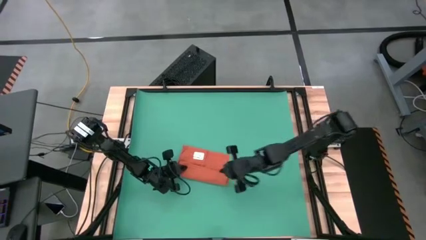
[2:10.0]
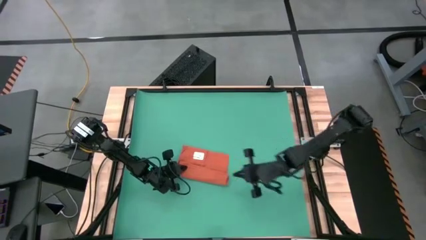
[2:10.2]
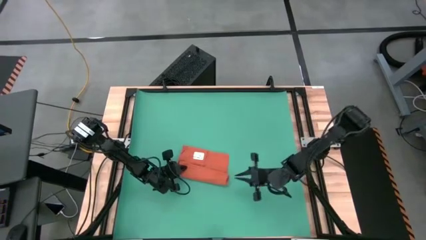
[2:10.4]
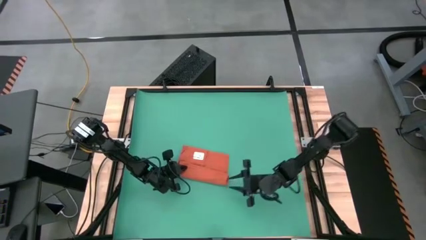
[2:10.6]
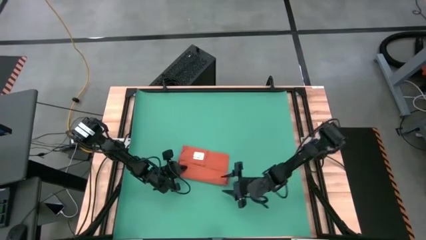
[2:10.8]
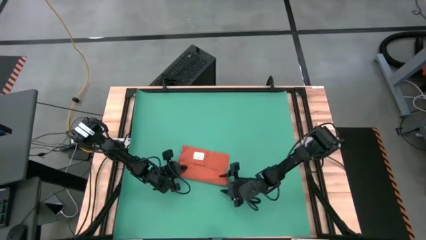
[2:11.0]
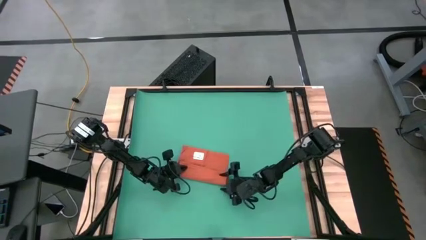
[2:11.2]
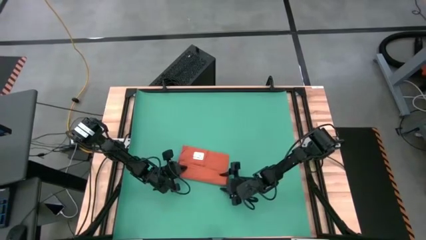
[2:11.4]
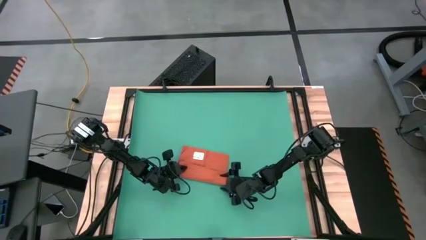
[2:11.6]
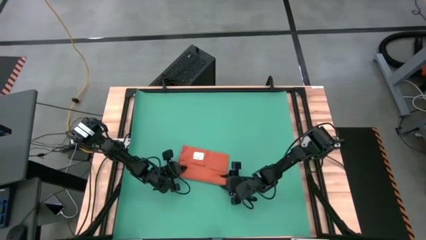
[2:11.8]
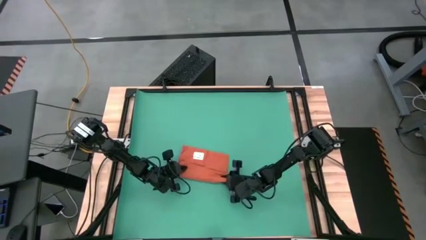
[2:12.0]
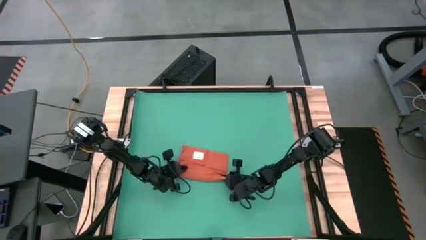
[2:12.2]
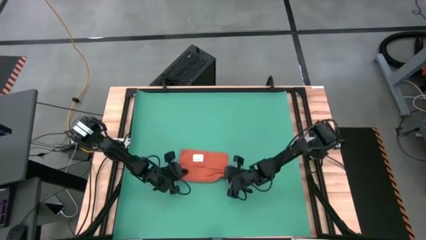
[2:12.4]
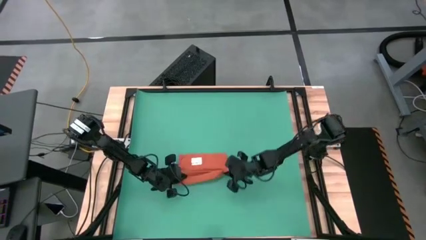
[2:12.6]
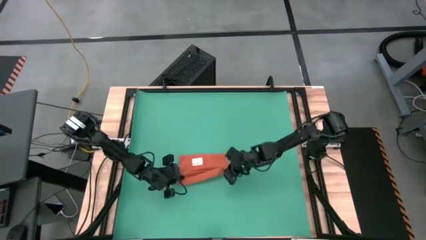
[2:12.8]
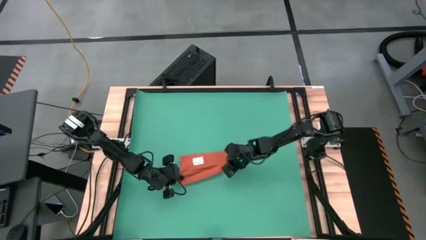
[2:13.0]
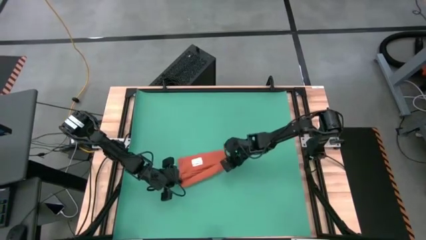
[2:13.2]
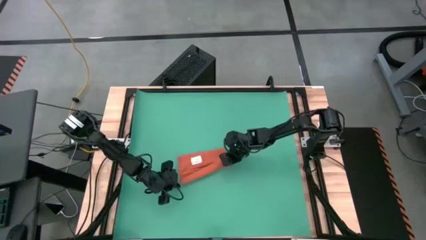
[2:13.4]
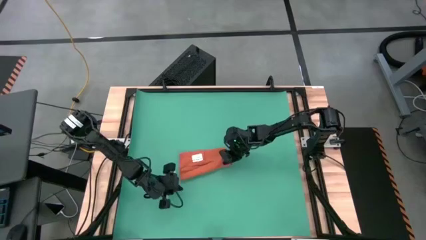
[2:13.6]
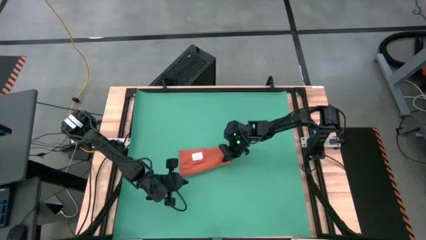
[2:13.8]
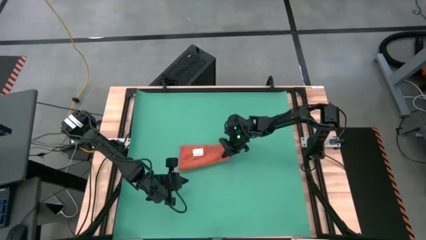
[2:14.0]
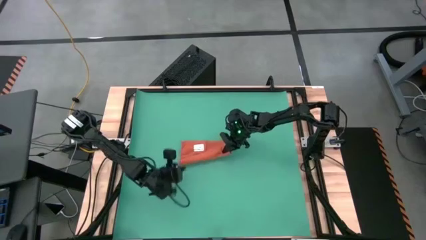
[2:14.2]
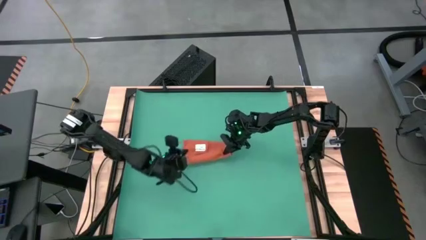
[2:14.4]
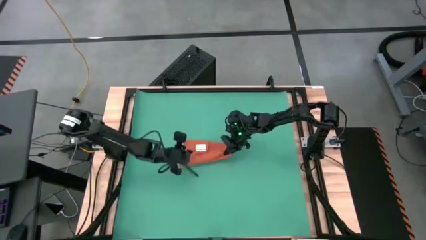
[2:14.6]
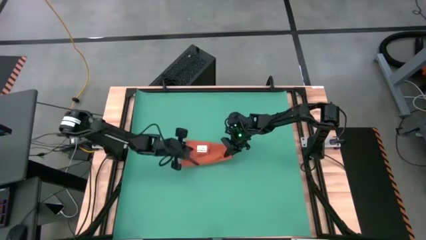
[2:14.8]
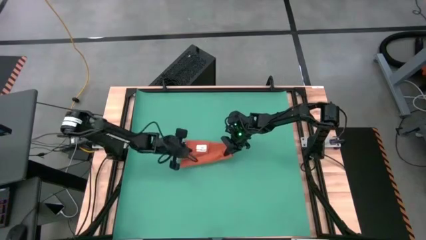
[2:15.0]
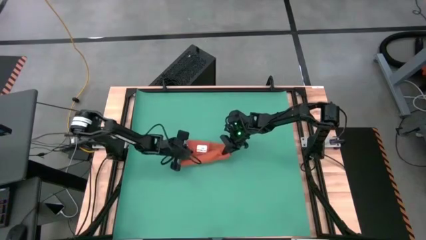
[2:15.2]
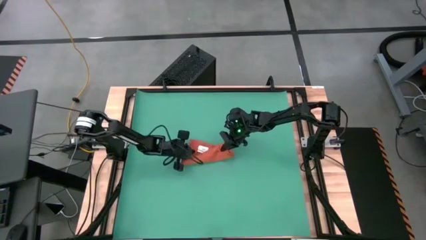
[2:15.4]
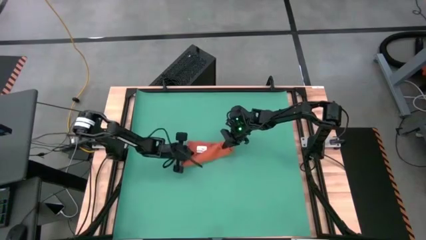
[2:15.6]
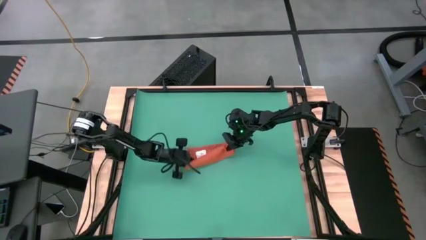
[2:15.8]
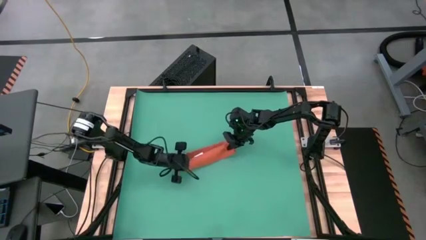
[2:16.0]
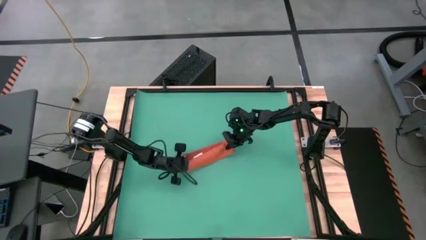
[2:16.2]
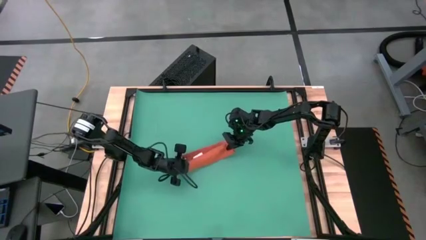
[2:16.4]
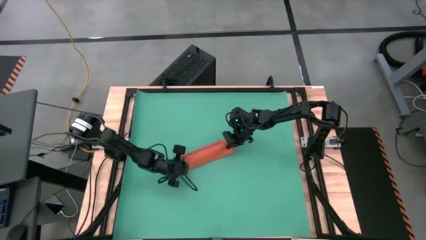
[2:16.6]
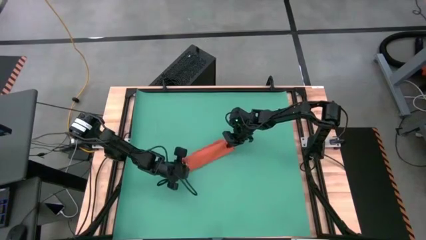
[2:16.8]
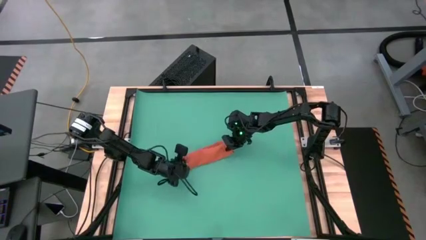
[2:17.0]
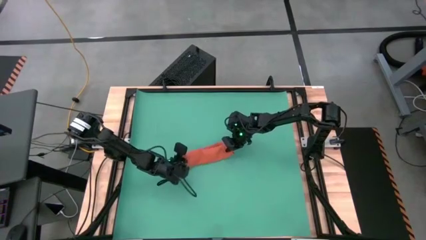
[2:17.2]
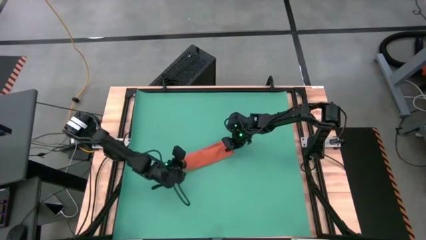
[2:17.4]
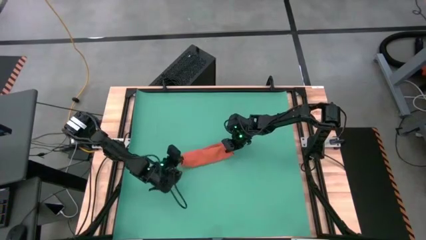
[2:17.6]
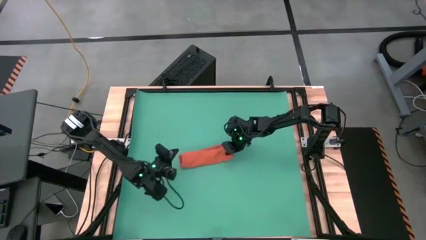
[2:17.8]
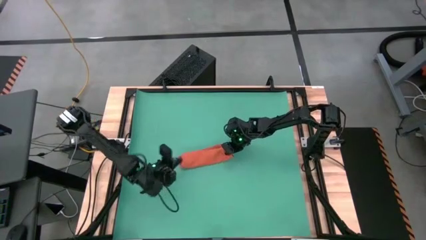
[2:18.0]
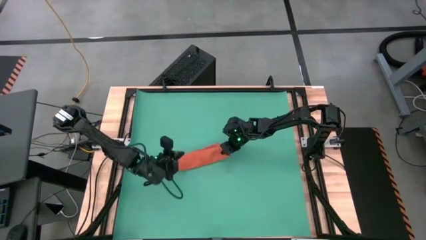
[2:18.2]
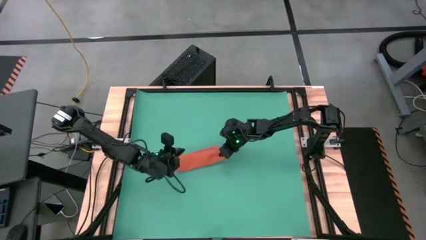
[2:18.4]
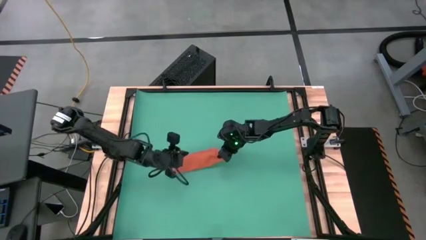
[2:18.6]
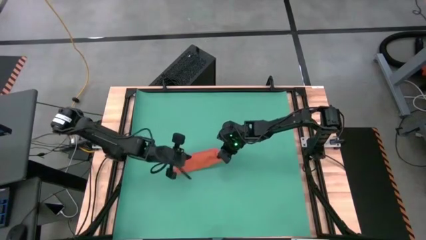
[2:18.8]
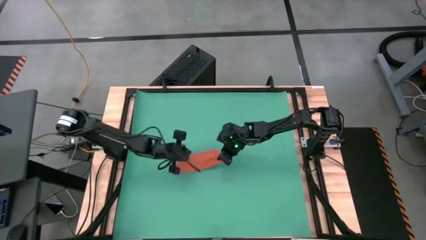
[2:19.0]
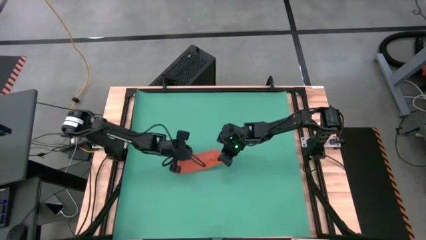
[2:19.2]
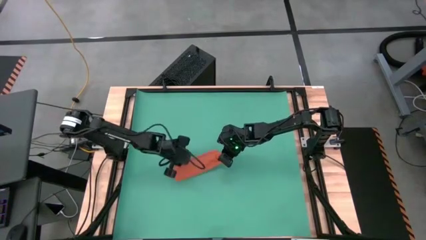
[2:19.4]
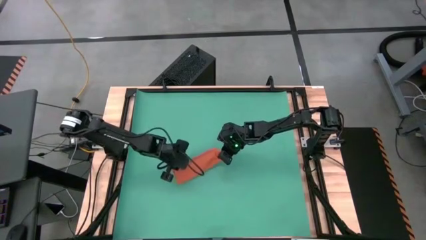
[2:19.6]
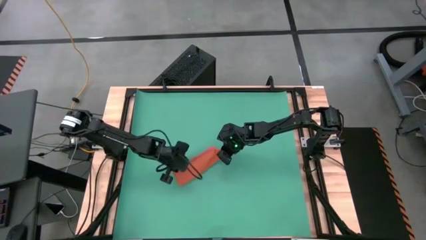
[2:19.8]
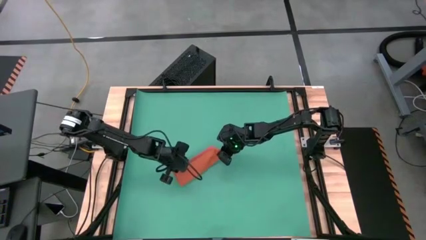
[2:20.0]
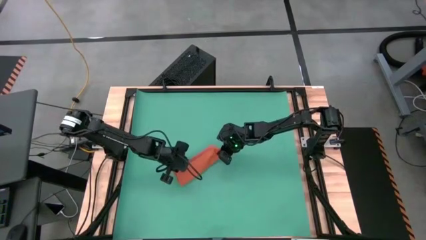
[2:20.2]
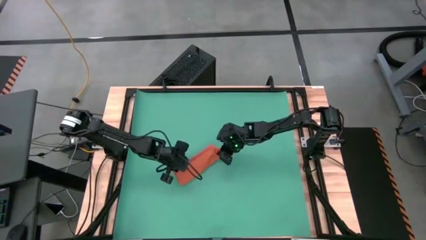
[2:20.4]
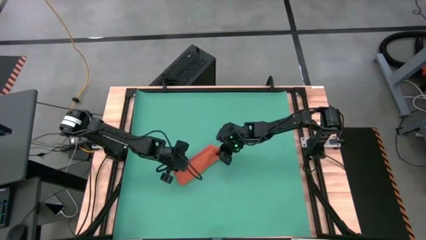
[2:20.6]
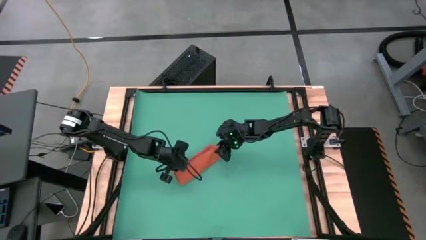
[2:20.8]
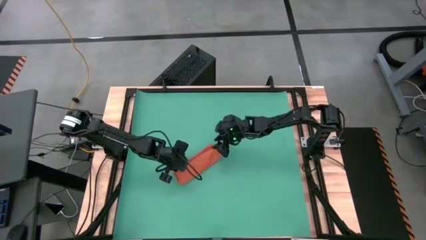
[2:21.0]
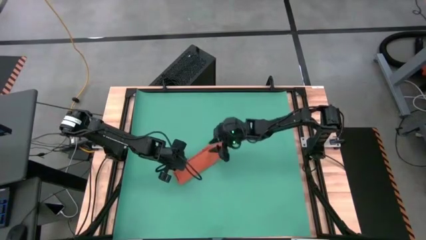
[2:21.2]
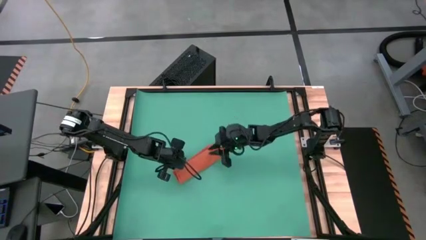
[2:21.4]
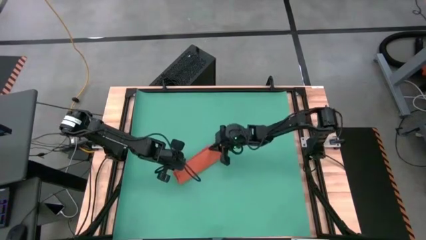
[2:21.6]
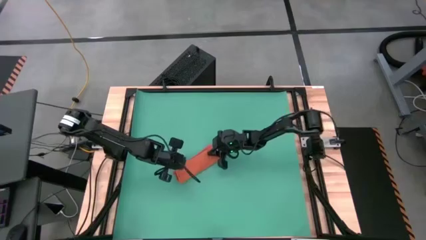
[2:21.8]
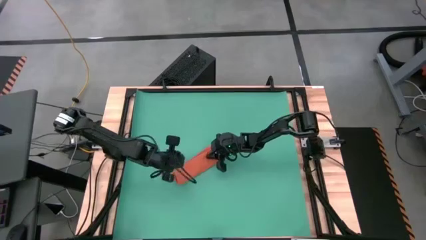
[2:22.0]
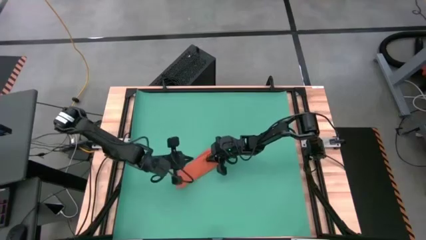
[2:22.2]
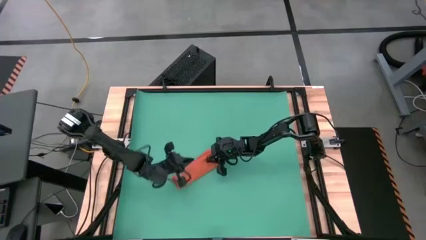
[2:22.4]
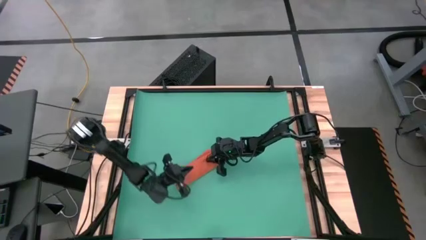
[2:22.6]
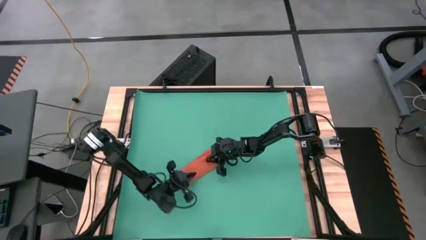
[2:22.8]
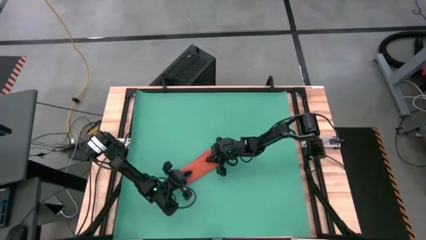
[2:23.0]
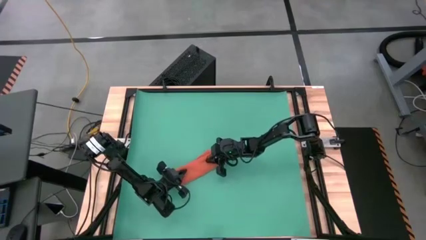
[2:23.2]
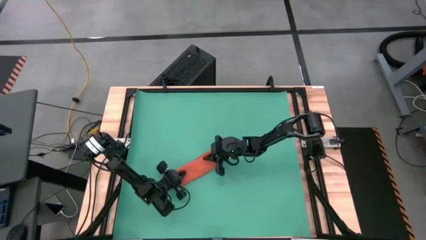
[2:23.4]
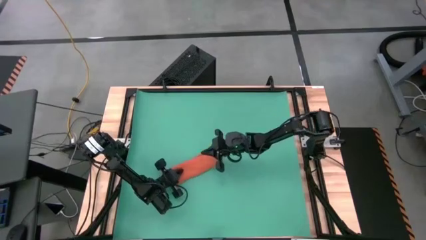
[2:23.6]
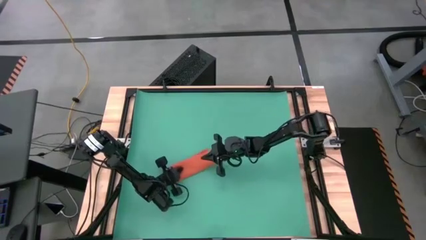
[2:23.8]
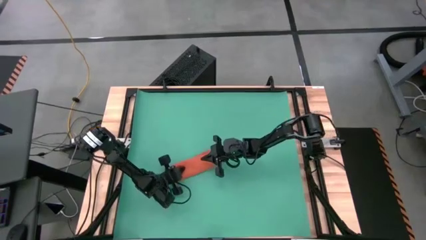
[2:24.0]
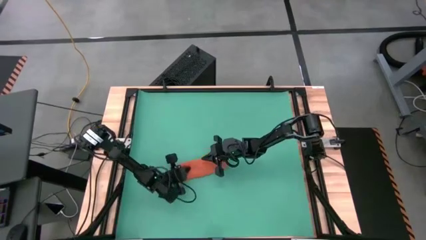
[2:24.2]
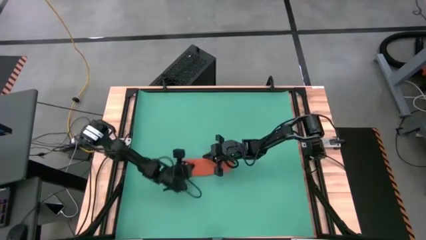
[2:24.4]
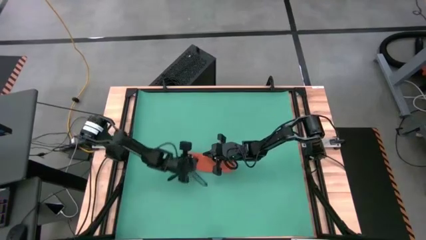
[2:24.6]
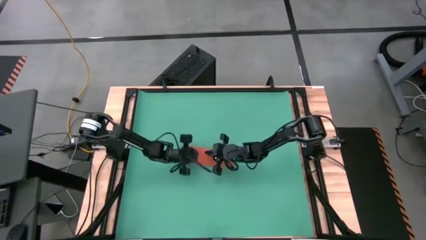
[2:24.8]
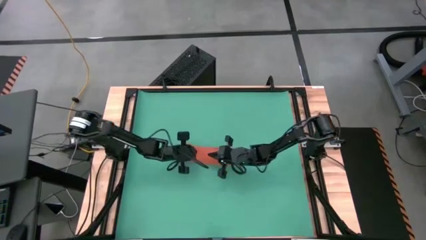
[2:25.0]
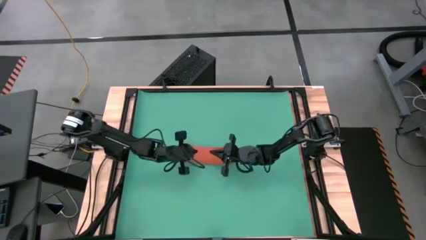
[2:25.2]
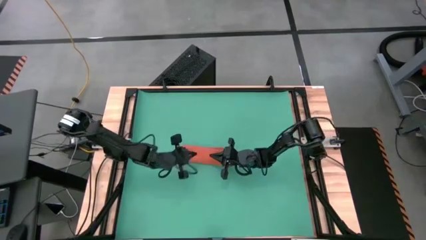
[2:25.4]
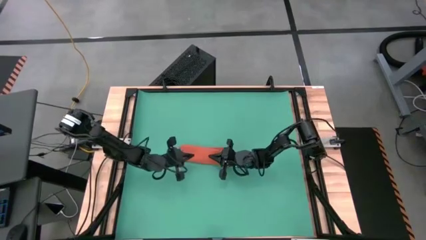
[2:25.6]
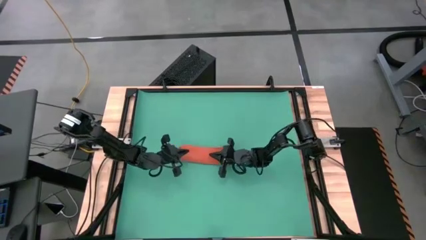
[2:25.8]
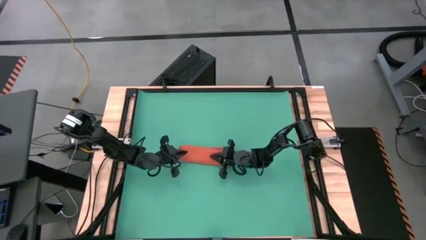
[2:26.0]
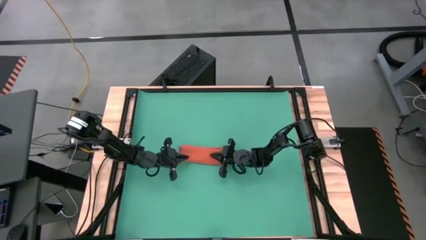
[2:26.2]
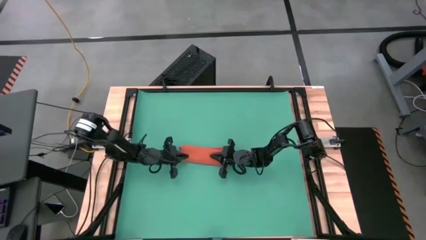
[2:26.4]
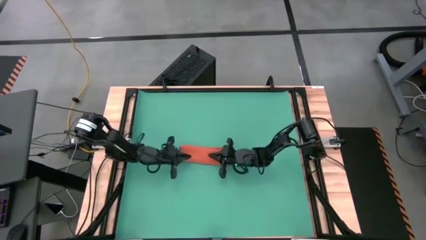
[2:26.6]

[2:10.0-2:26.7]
Task: Roll towel into tight, uniform cylinder
Roll the orange table napkin
